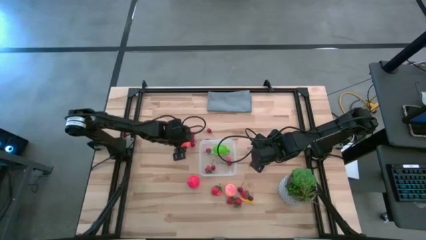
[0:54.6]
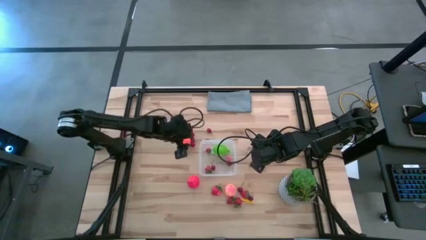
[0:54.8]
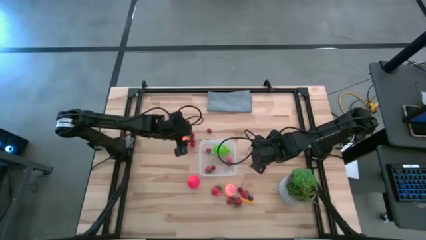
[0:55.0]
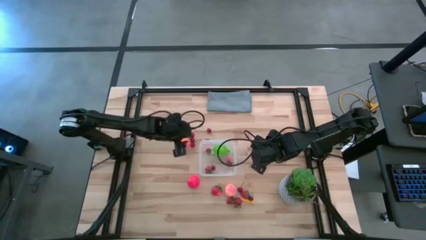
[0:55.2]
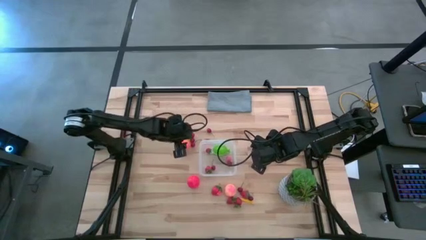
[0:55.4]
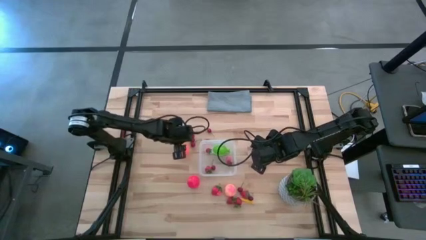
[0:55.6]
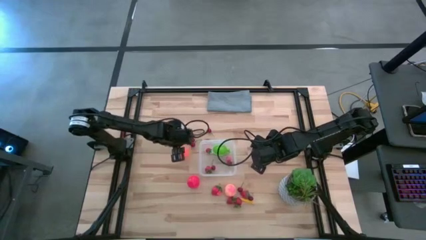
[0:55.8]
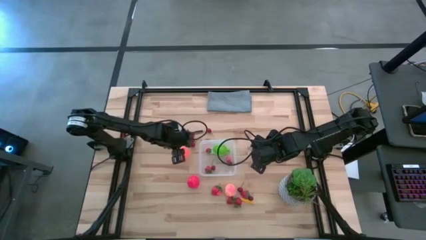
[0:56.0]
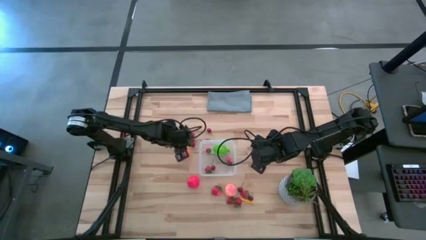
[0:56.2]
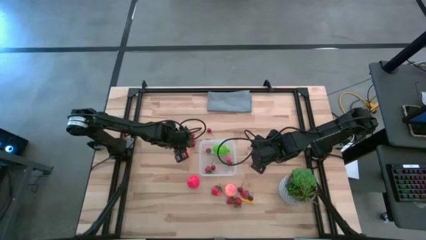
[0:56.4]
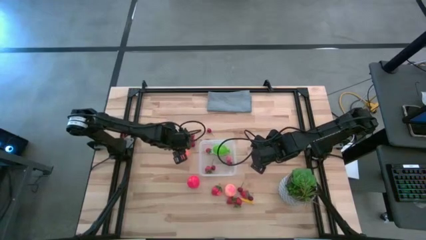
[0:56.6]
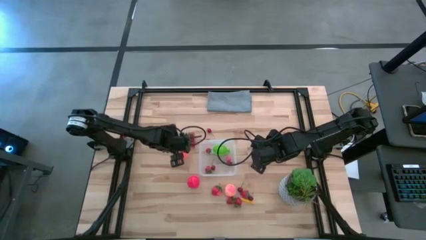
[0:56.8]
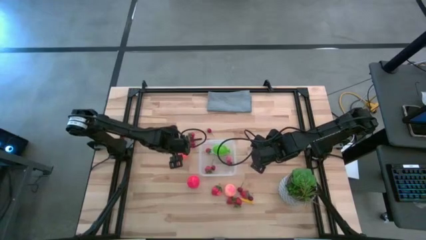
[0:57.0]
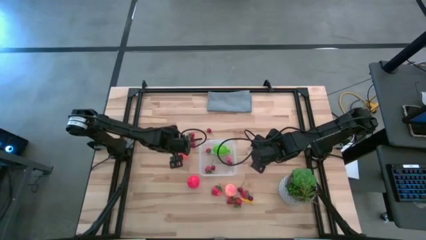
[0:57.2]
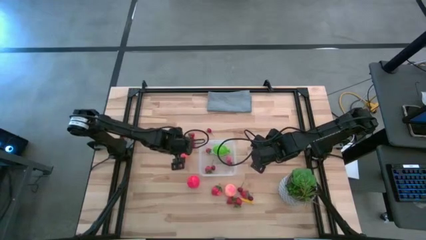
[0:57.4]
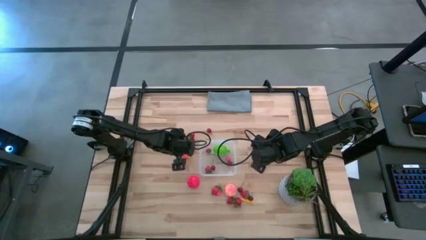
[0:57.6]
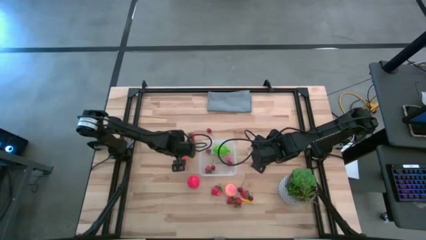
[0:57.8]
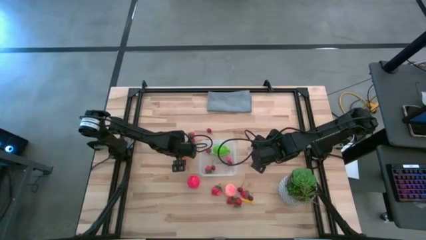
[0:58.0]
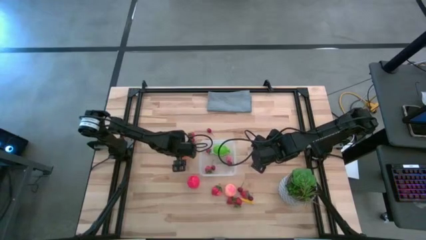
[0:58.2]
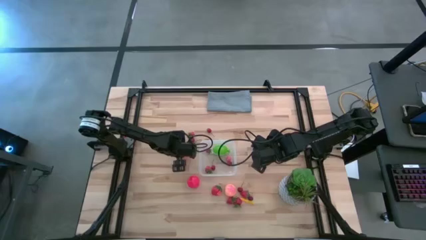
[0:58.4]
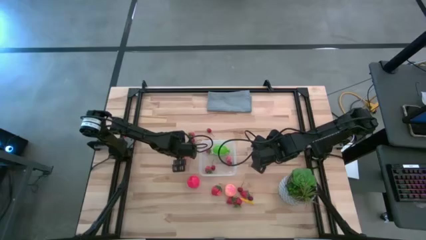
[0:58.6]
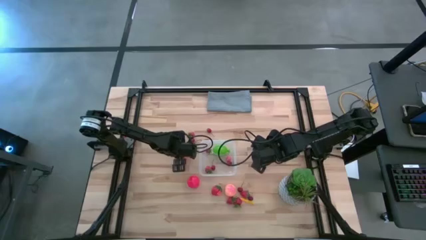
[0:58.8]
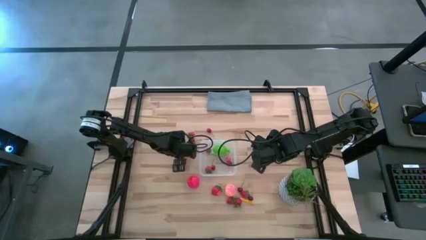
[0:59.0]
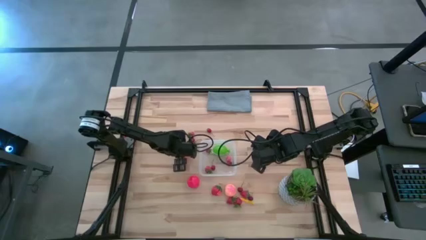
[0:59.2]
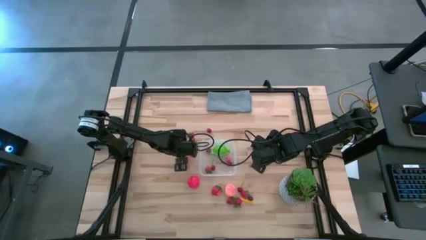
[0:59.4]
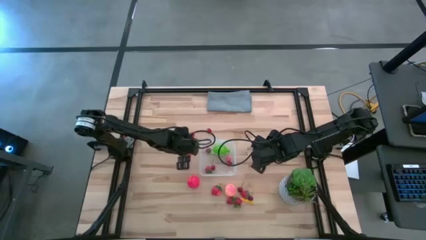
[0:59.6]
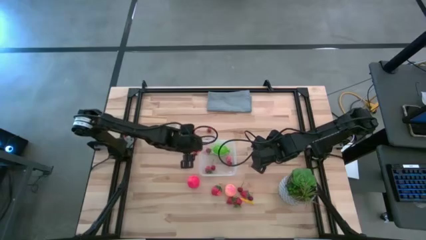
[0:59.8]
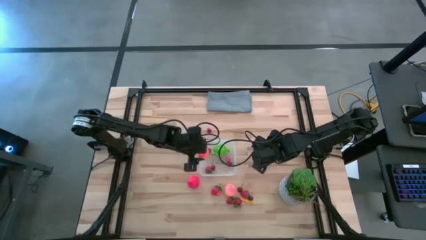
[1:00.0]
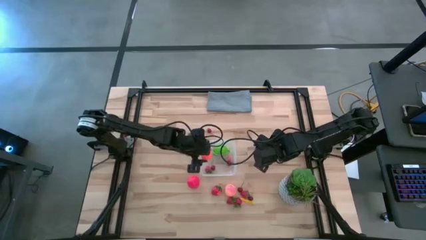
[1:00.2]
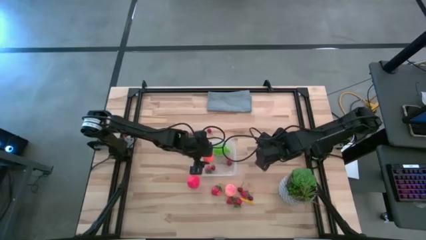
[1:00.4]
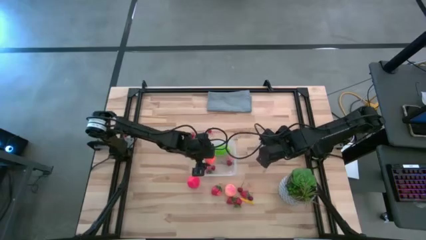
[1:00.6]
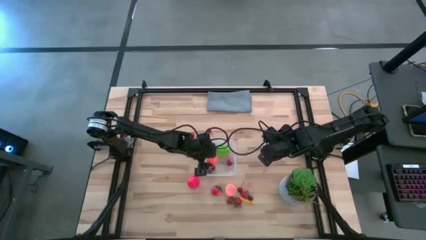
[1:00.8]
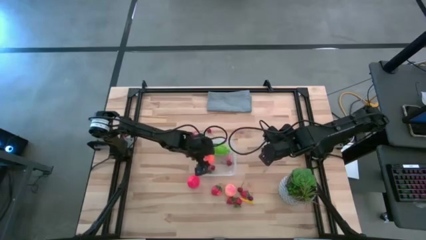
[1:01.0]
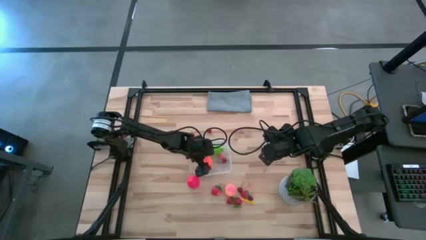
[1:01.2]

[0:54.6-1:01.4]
Task: Pick and placing Produce into tupperware
Put the orange pumpkin into the transparent container

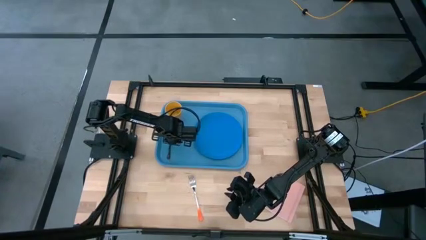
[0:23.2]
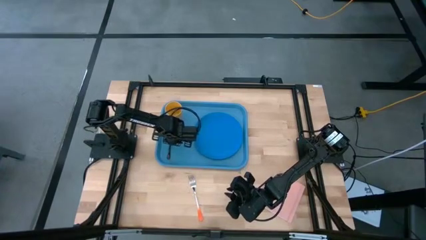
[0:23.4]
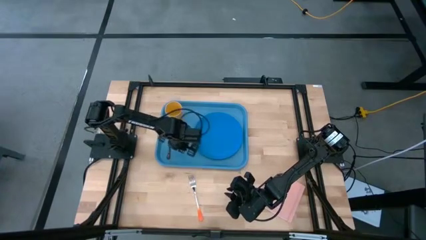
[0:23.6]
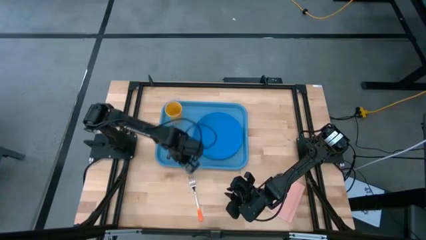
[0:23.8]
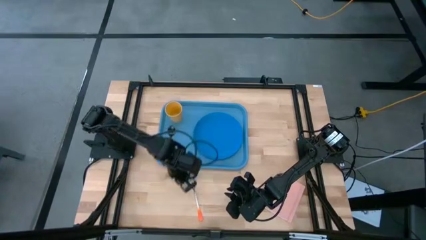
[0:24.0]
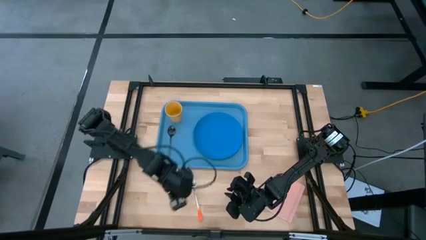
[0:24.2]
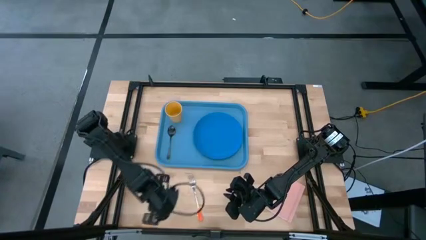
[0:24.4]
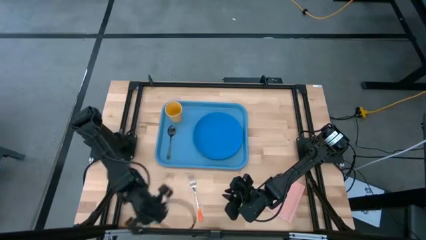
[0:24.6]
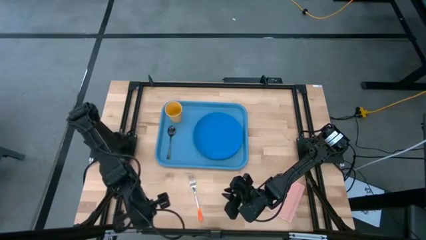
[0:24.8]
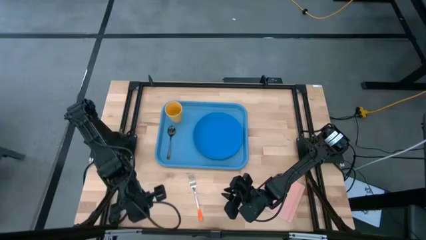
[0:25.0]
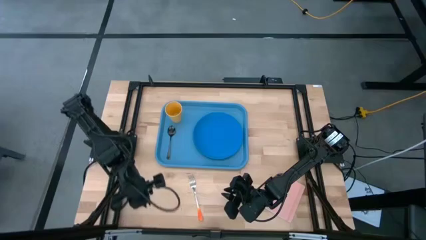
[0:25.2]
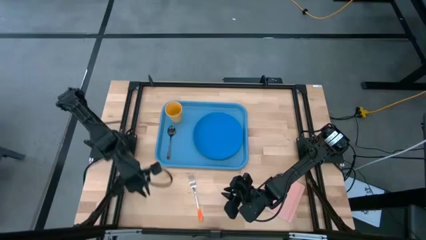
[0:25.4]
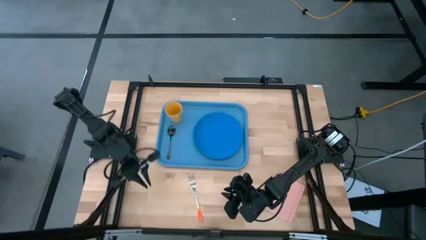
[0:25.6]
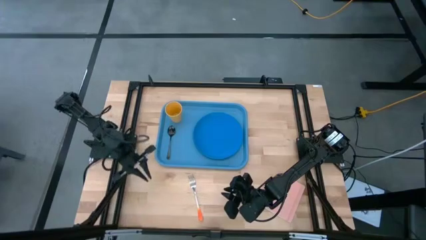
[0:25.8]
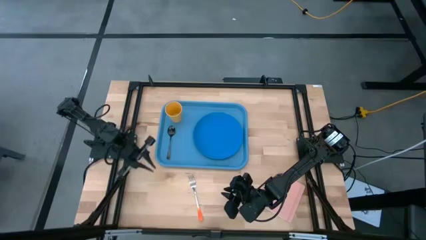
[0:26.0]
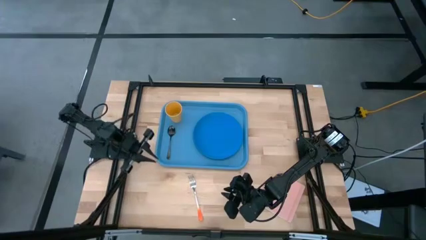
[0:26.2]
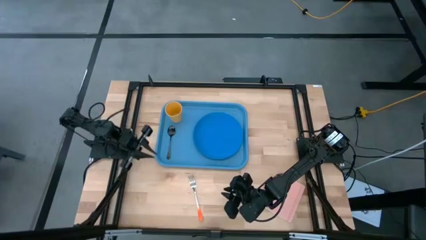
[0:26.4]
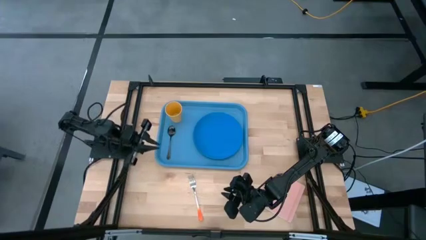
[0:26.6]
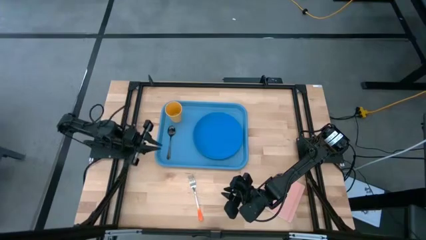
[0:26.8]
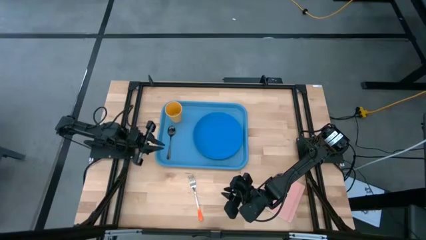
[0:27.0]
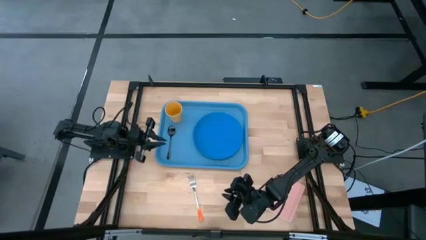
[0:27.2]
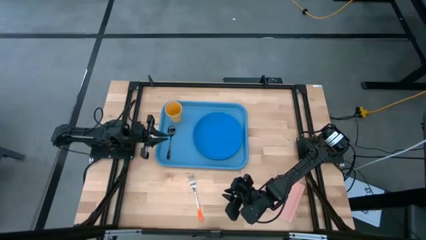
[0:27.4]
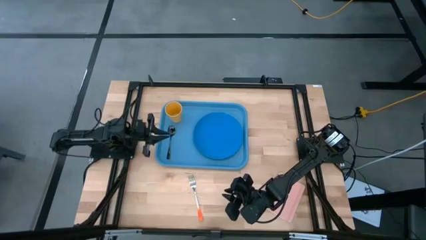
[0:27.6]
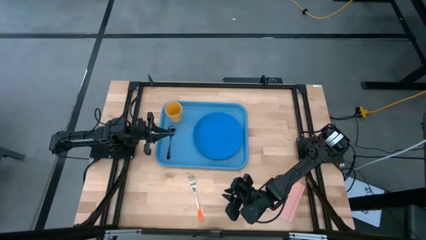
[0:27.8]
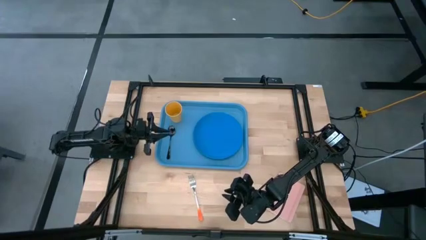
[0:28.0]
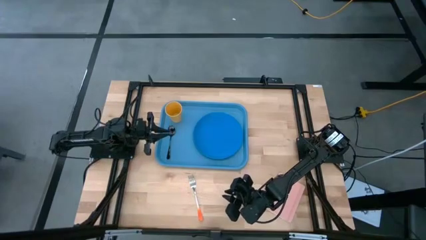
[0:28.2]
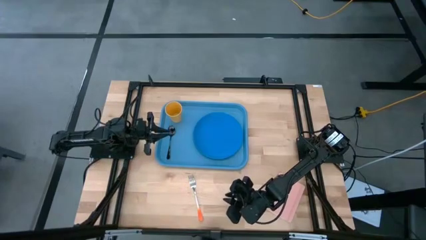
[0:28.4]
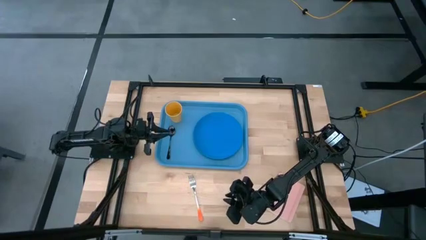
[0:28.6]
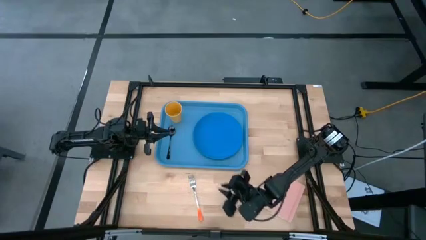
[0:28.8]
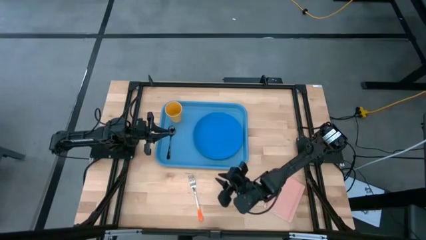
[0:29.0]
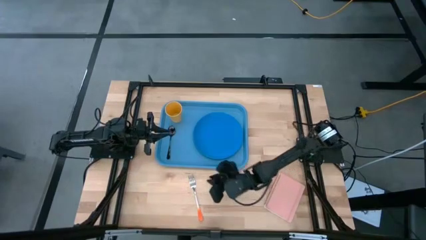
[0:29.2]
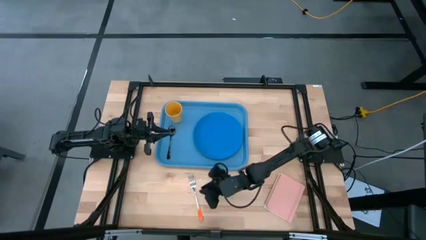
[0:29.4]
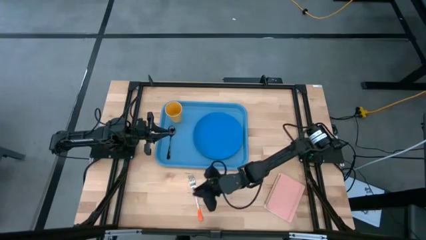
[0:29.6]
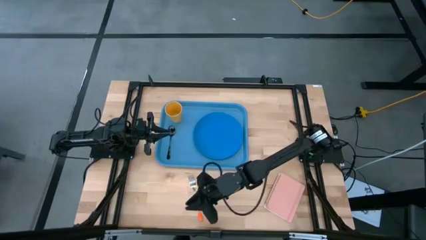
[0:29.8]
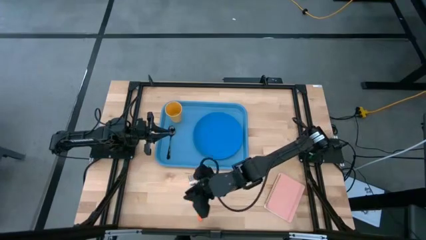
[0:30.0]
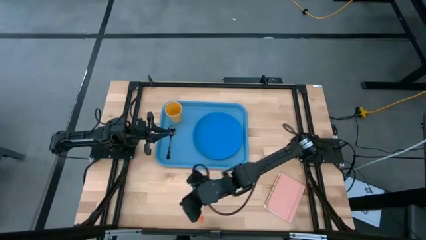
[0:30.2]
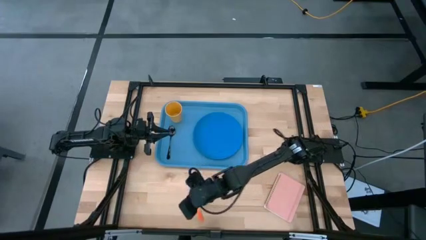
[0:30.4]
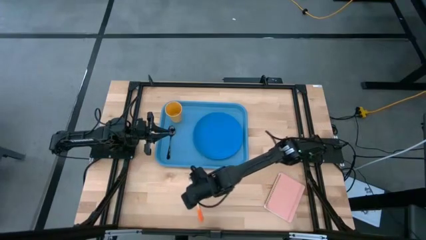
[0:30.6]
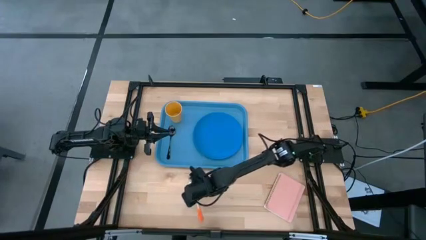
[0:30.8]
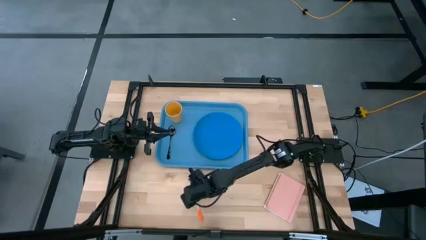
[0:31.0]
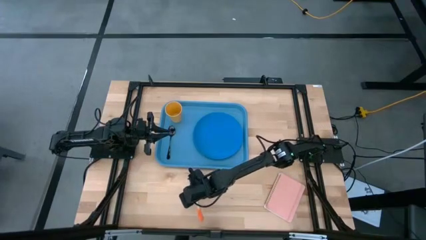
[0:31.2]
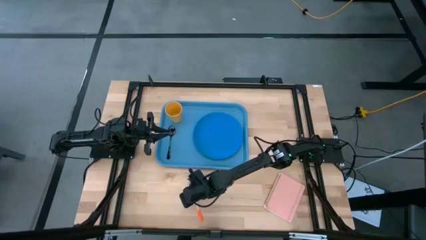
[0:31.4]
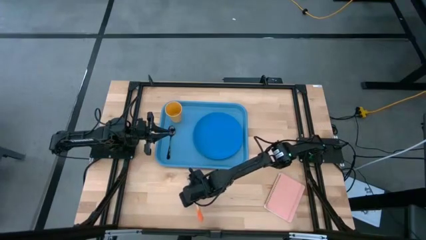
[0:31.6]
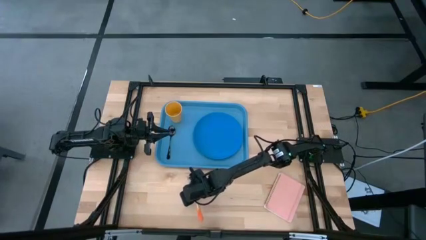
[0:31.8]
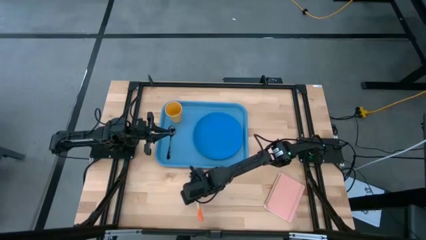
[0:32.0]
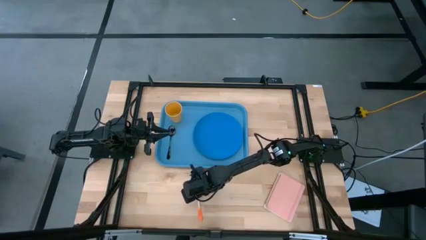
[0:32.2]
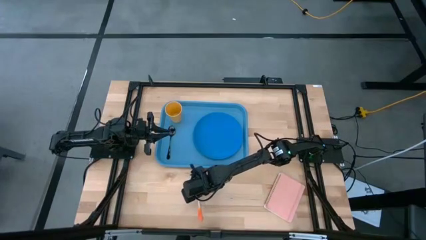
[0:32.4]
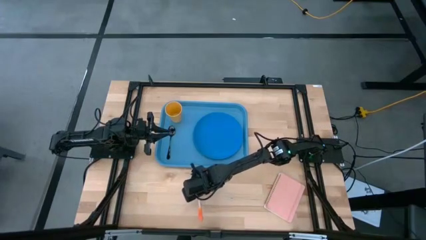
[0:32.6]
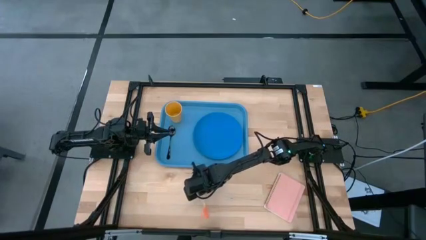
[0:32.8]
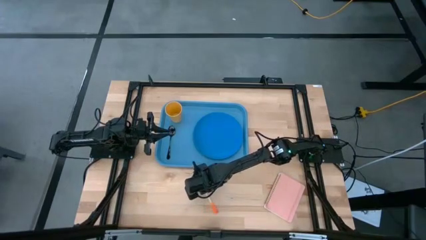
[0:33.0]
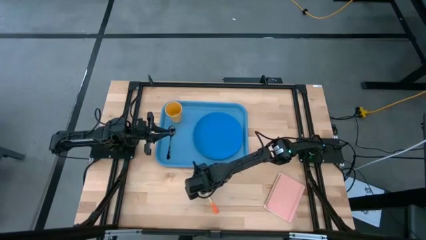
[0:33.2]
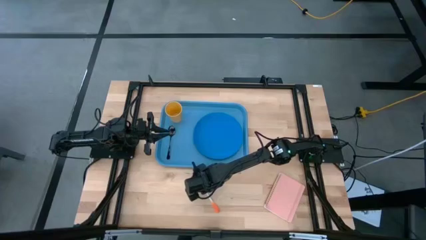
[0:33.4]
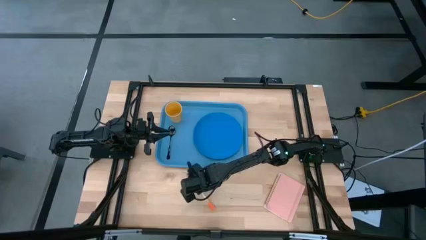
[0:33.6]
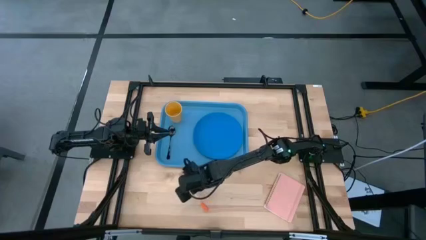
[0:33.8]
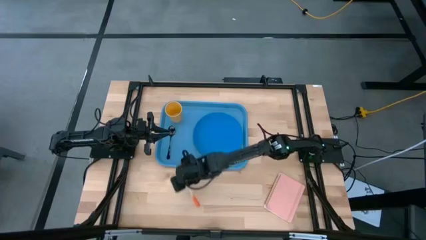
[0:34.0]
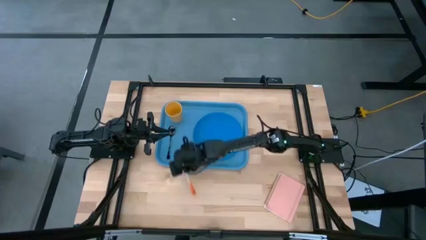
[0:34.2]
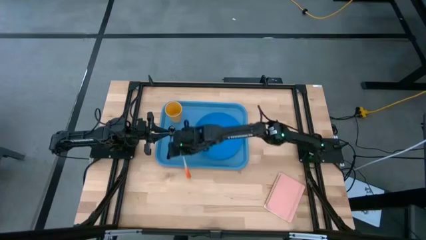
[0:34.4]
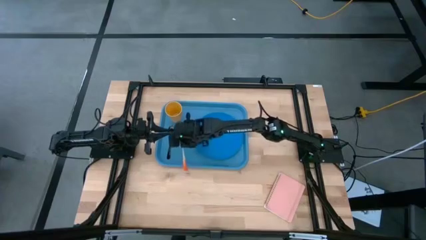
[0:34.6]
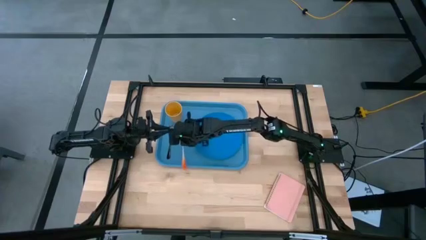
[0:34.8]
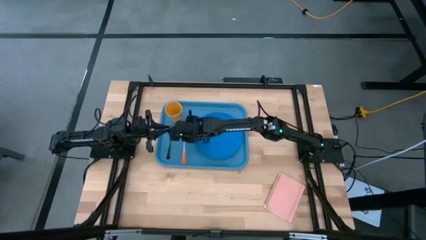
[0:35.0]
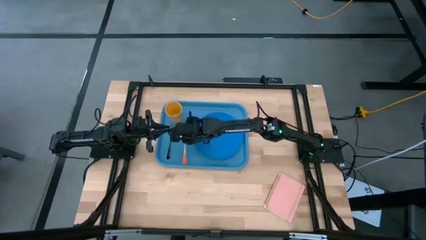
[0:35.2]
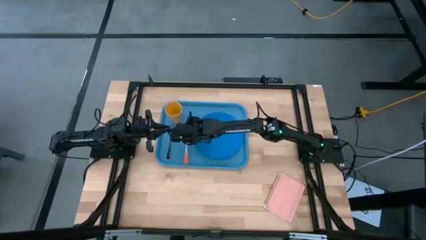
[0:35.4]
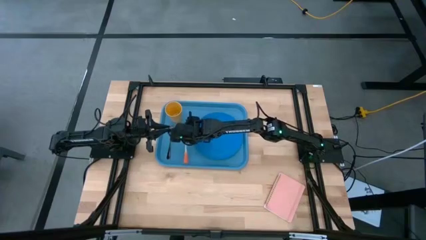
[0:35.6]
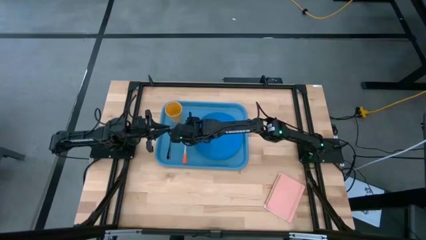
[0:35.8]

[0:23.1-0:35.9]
Task: Pick and place plate/cup/fork/spoon on tray
Put the orange fork on the light blue tray to the left of the blue plate
